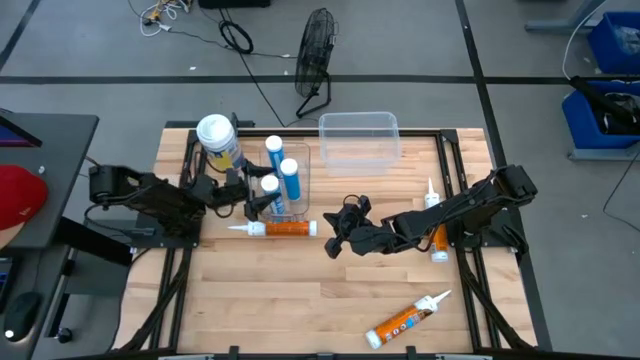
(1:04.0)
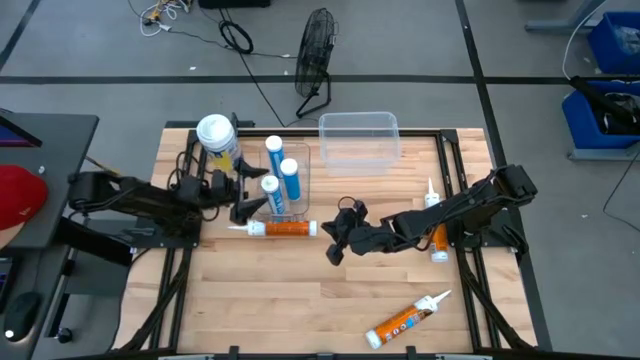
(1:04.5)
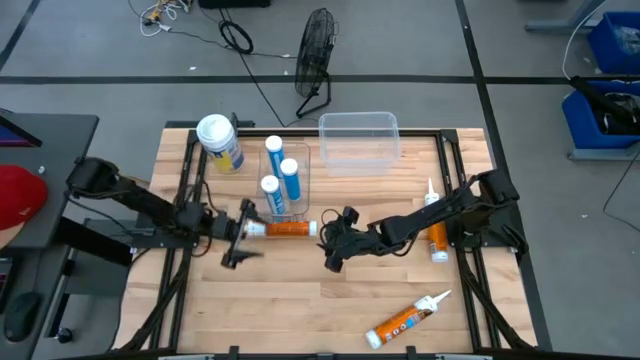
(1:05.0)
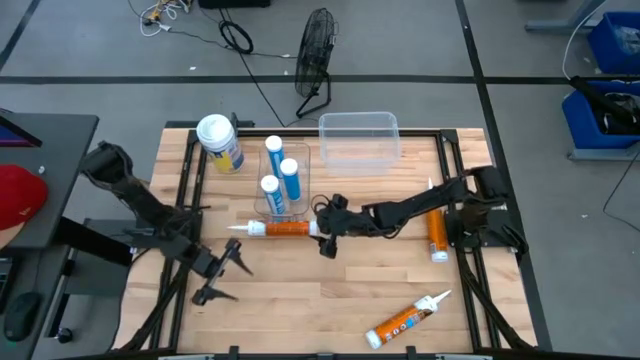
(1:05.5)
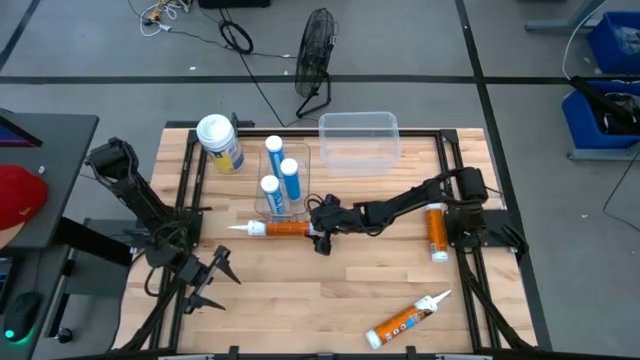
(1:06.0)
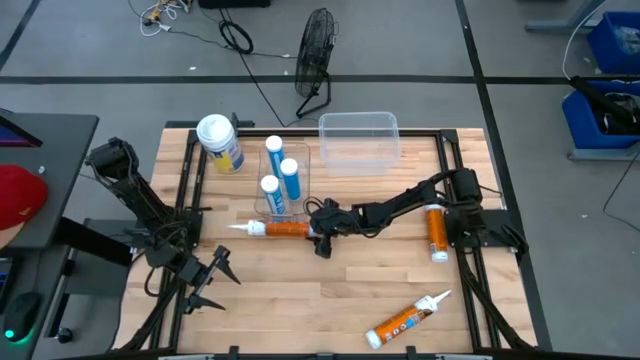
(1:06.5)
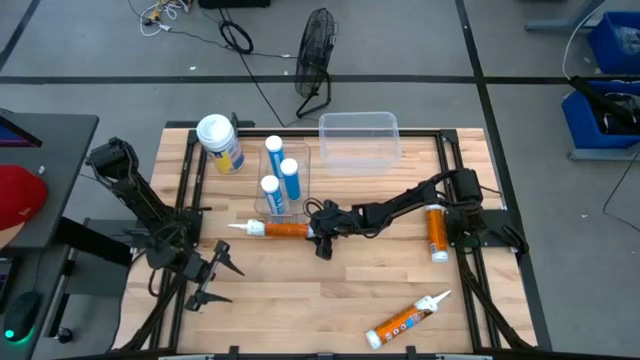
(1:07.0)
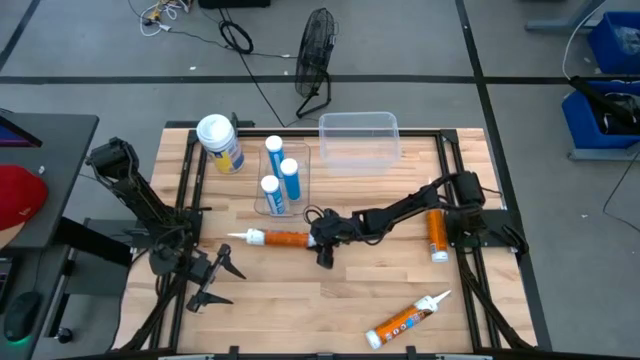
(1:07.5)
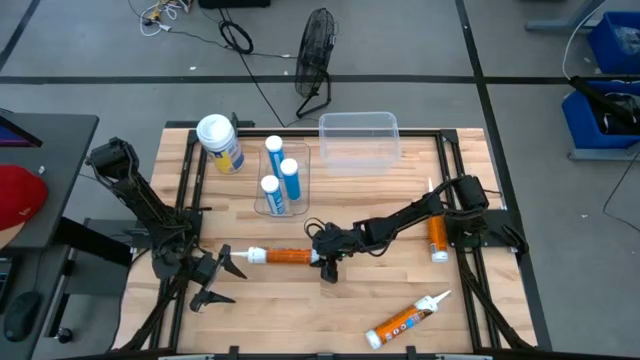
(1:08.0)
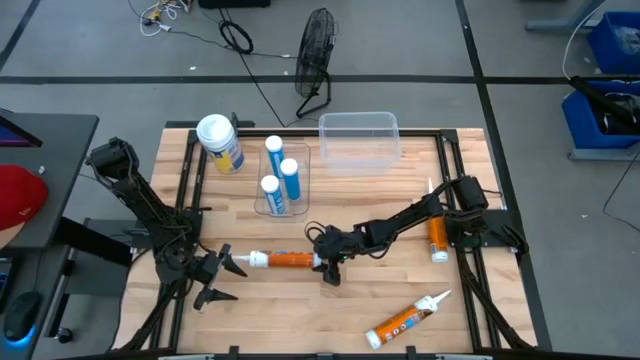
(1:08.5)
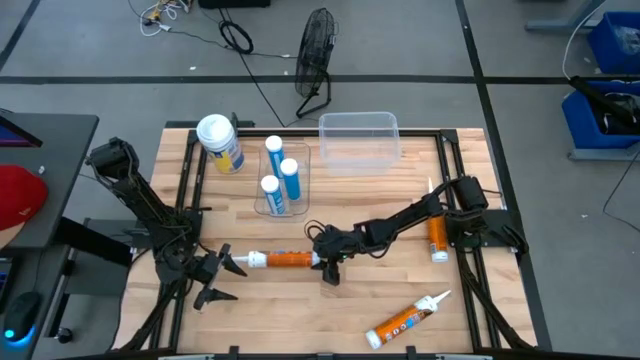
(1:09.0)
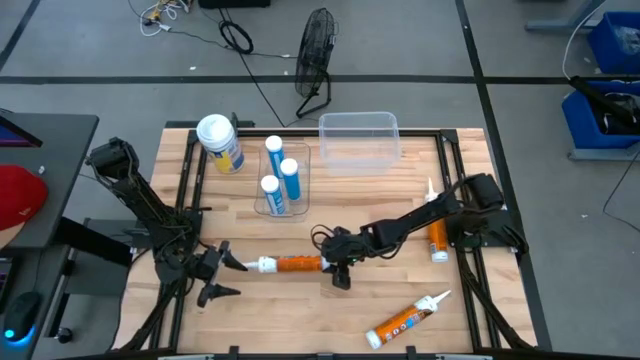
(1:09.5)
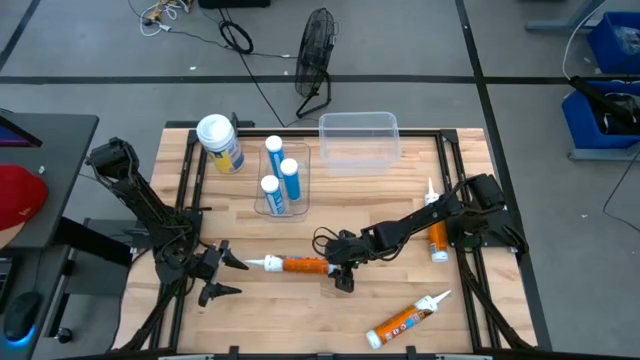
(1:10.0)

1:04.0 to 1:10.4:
Task: Pick & place silicon tubes, Sealant and Lysol wipes
Put the top left orange sealant into the right transparent bin

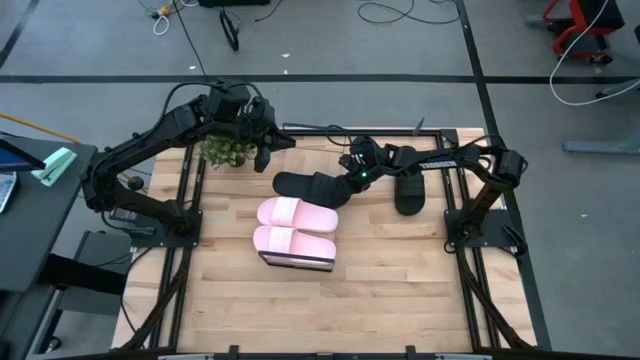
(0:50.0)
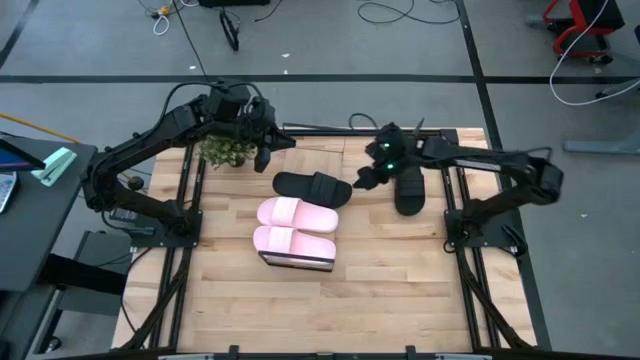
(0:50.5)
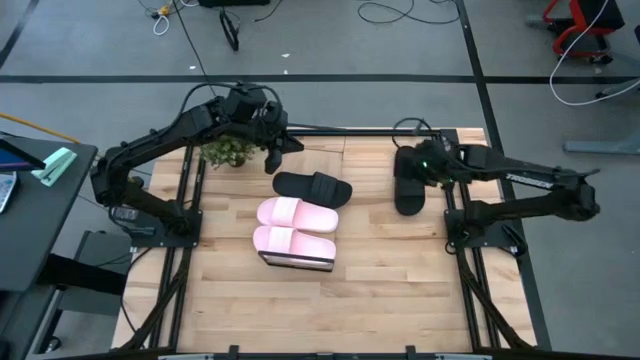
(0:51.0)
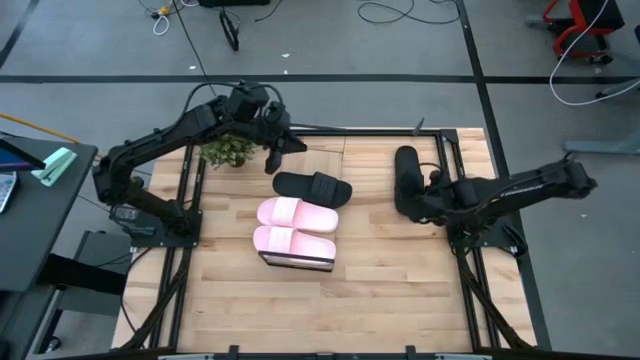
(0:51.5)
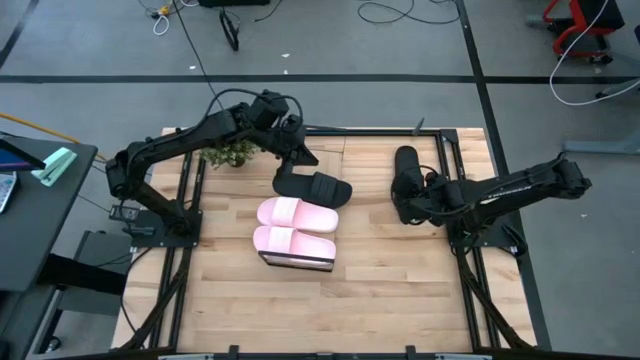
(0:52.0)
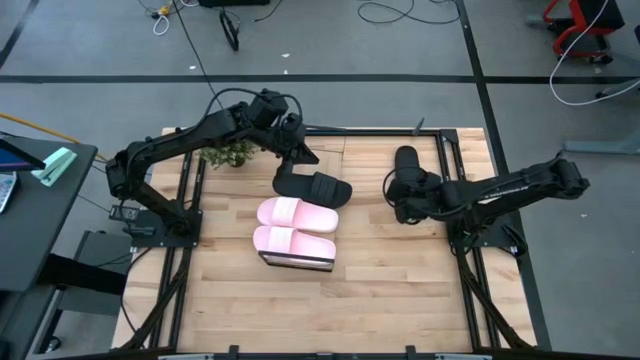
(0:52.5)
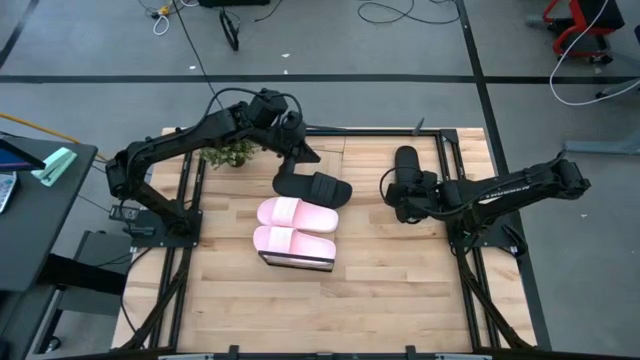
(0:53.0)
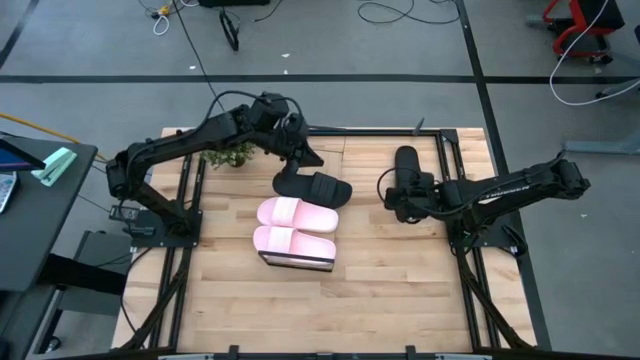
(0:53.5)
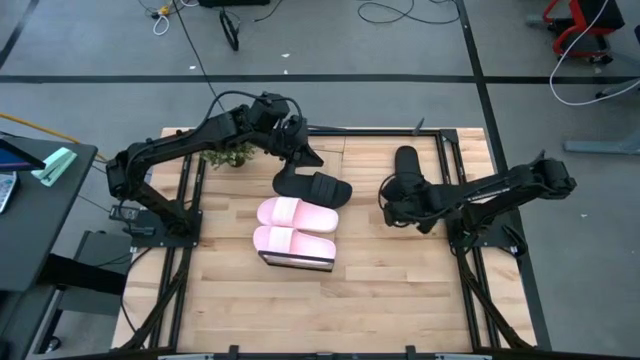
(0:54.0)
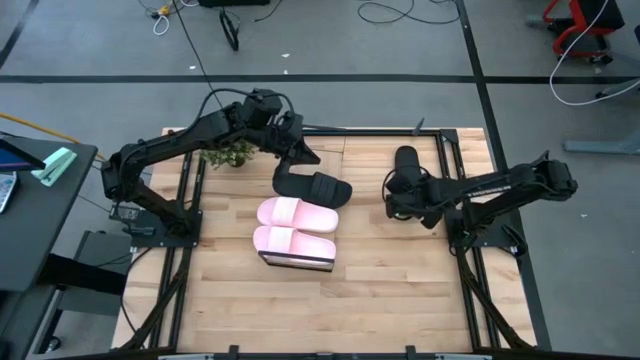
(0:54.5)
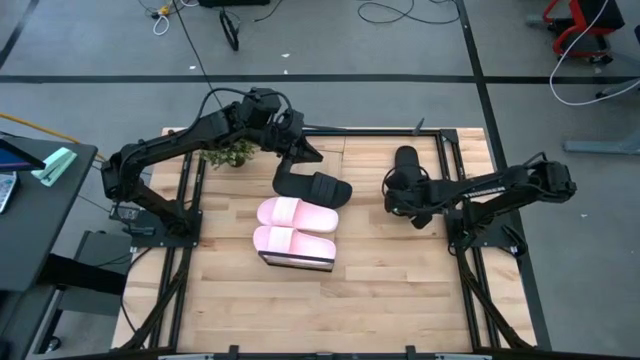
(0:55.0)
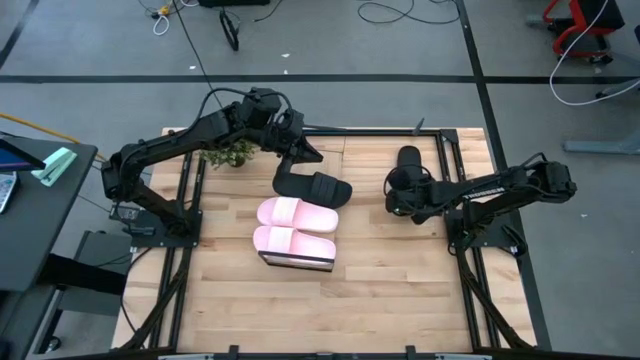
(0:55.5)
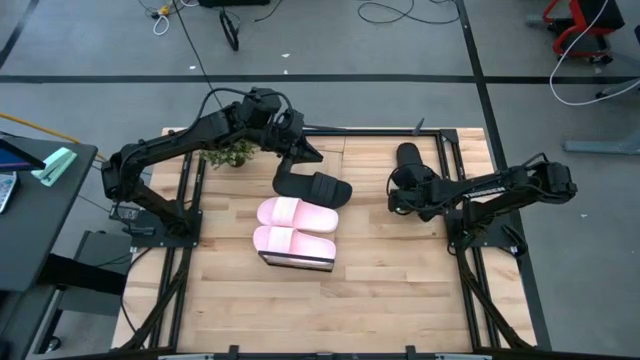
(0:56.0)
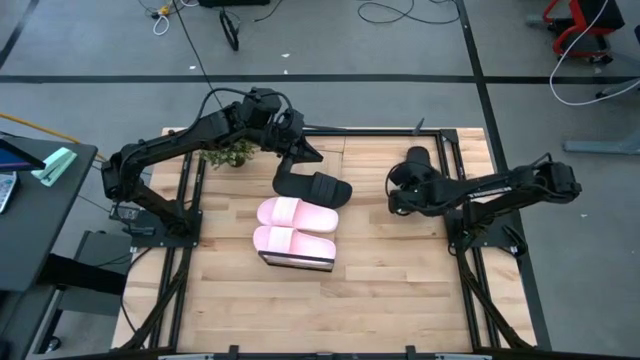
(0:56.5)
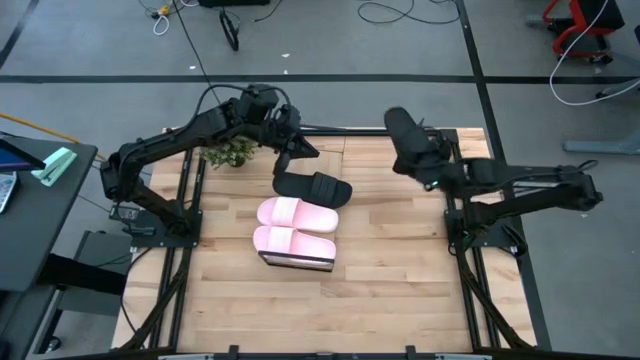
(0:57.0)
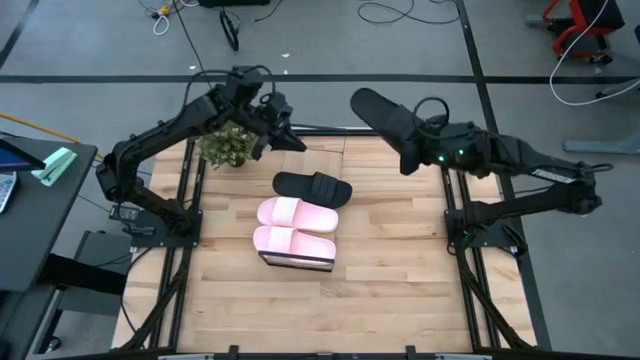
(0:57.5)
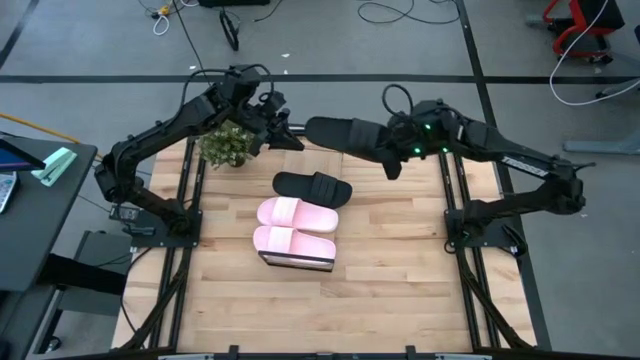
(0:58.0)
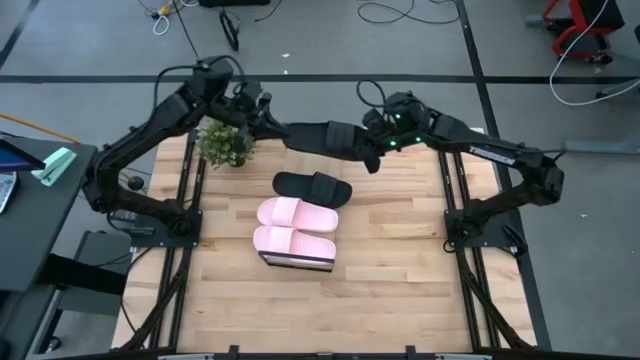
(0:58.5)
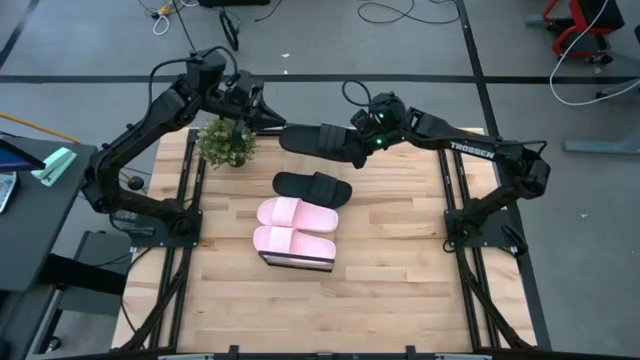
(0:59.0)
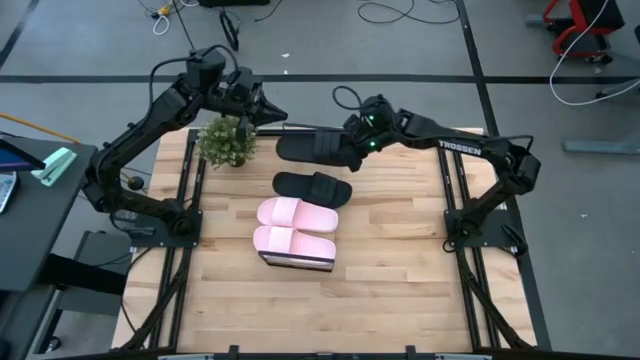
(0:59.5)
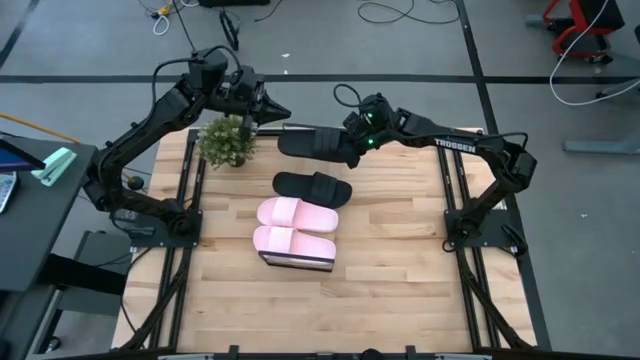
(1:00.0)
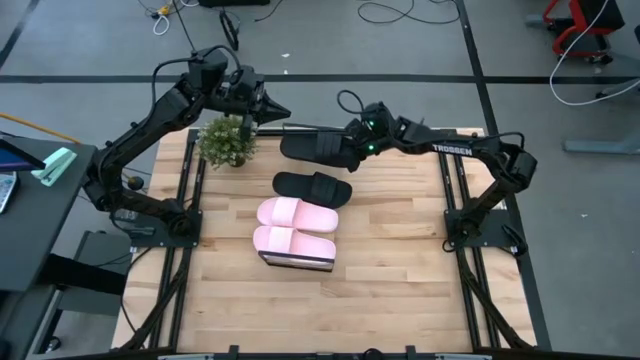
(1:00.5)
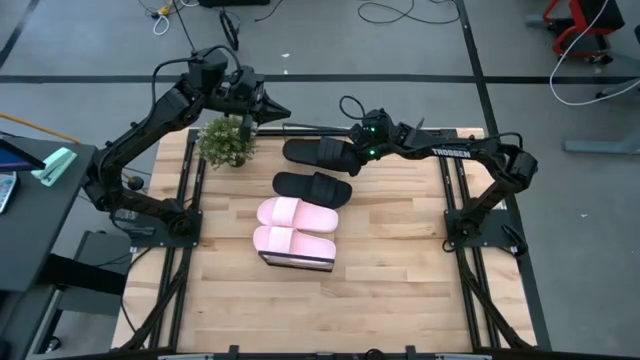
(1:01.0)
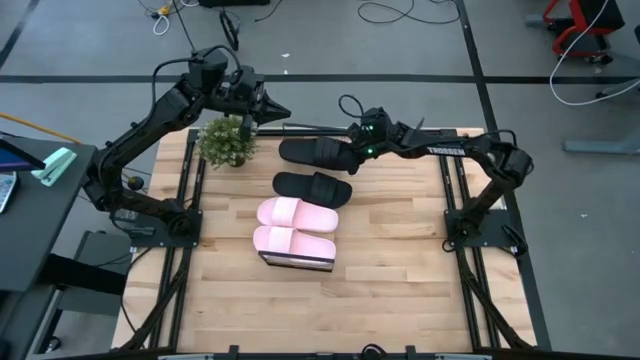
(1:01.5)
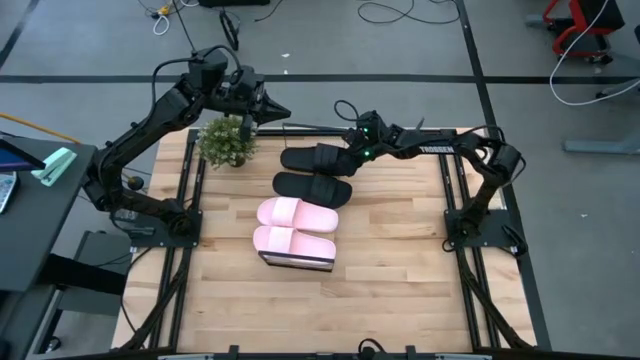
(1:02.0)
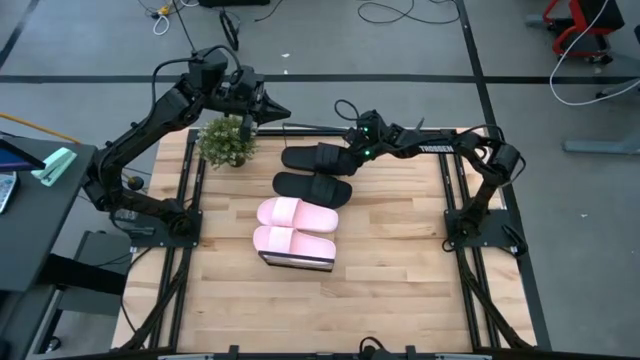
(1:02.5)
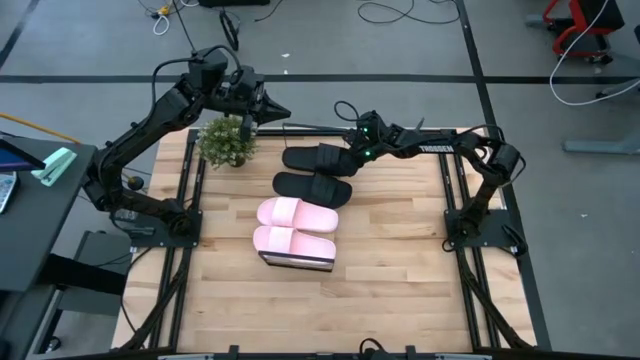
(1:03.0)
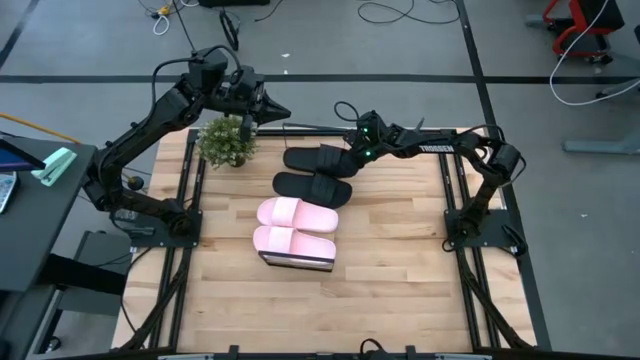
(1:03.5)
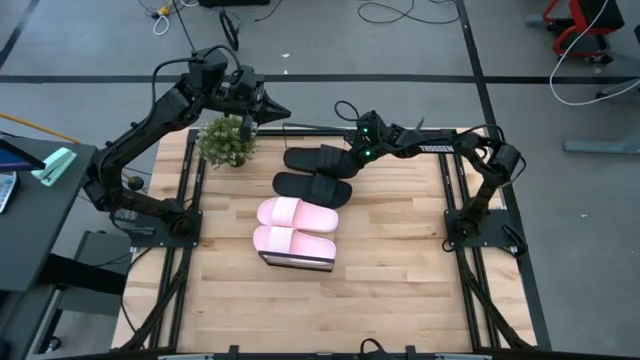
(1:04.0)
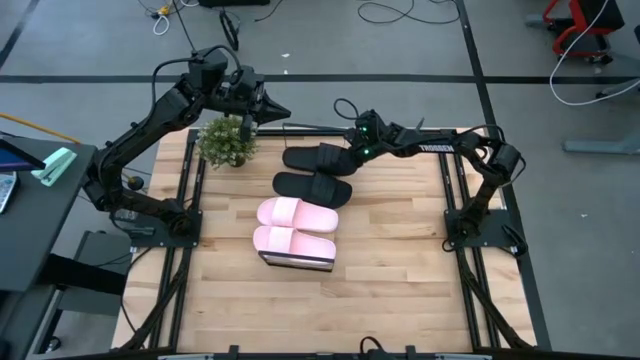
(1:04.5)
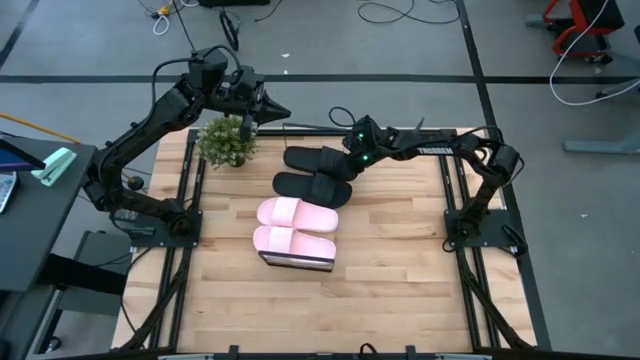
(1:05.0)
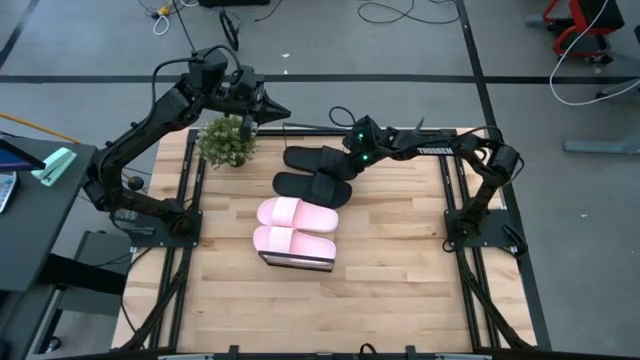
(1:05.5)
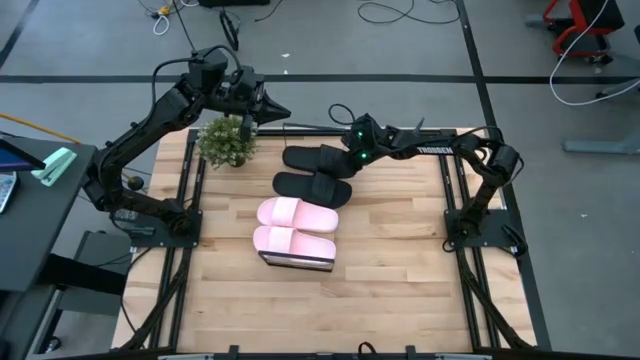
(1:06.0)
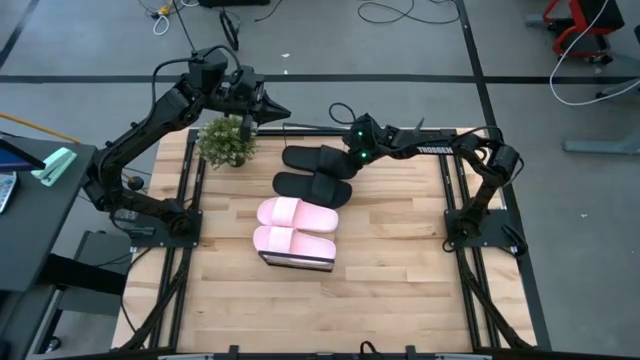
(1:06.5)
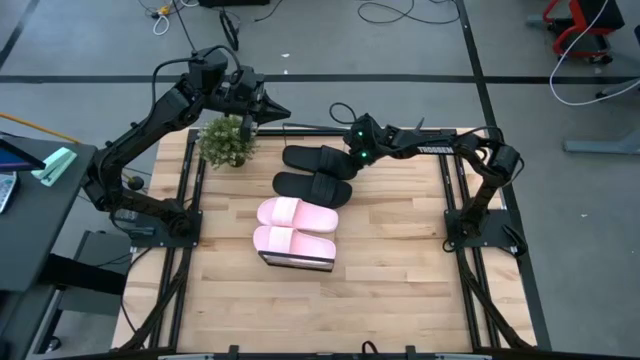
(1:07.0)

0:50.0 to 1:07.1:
Task: Pick and place slides into the shelf
Put the black slides on the shelf
